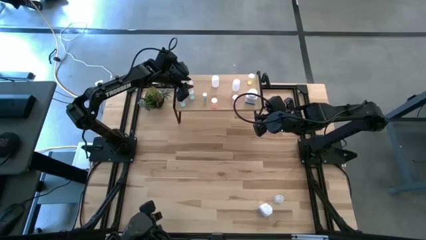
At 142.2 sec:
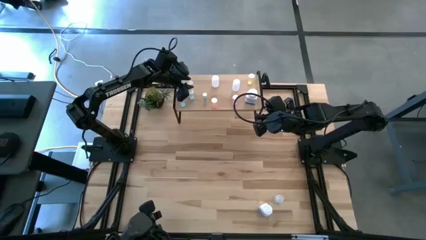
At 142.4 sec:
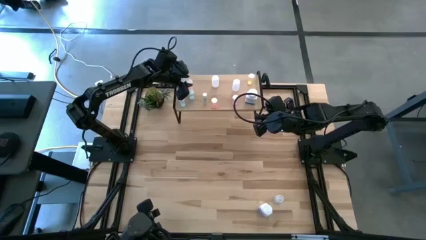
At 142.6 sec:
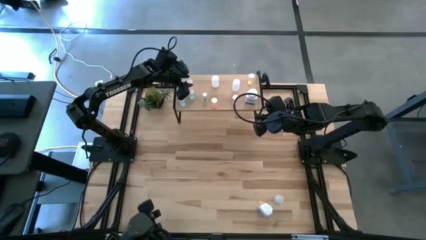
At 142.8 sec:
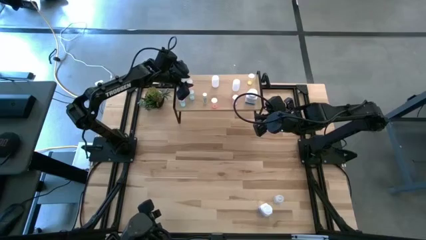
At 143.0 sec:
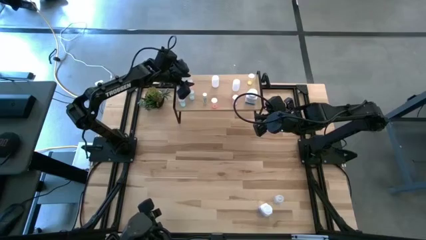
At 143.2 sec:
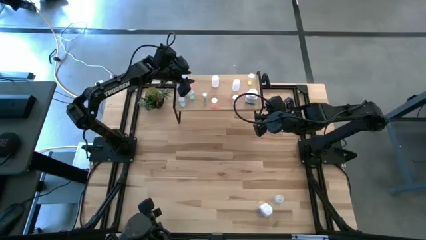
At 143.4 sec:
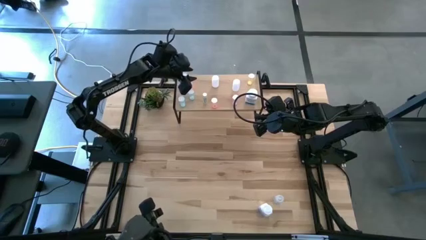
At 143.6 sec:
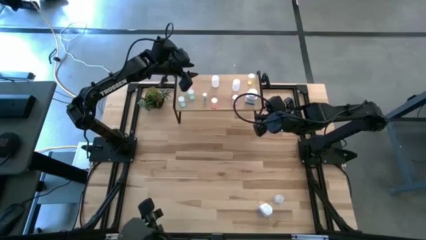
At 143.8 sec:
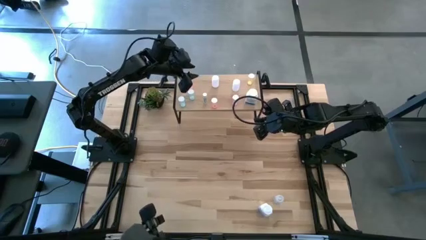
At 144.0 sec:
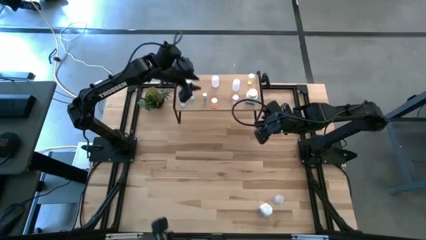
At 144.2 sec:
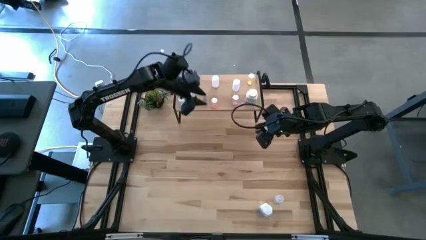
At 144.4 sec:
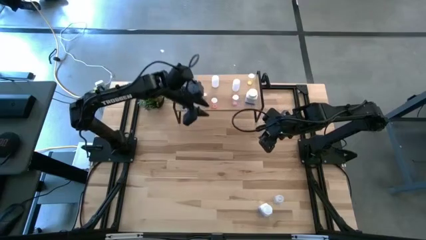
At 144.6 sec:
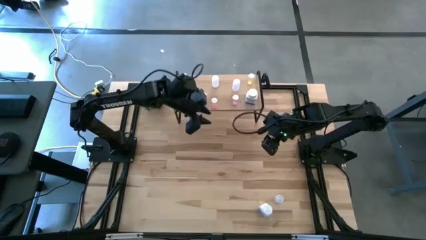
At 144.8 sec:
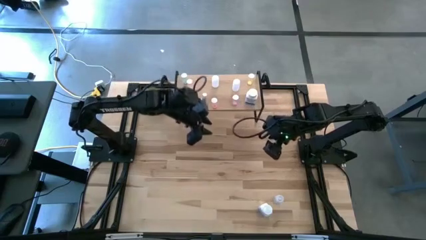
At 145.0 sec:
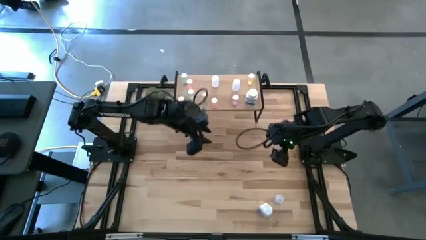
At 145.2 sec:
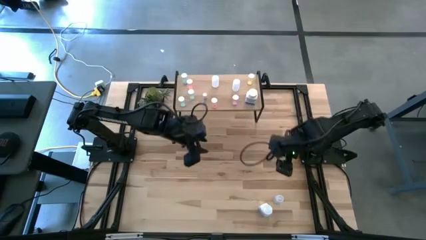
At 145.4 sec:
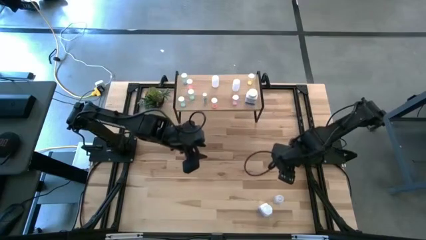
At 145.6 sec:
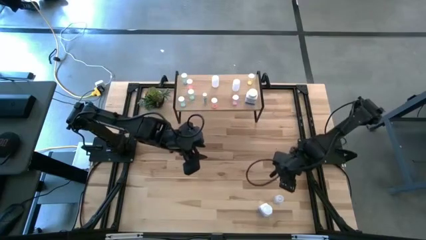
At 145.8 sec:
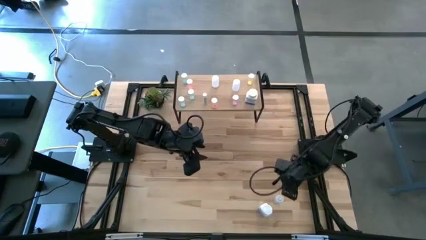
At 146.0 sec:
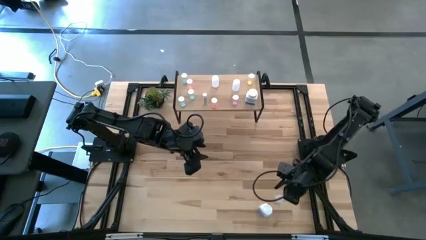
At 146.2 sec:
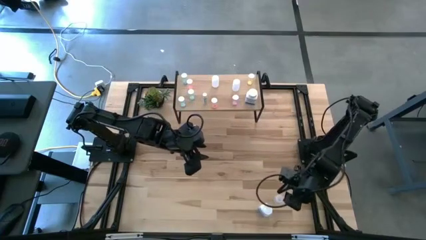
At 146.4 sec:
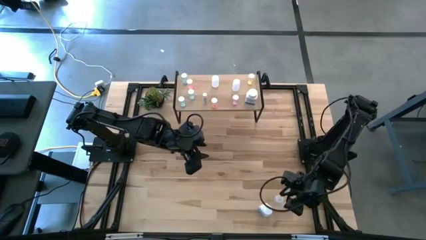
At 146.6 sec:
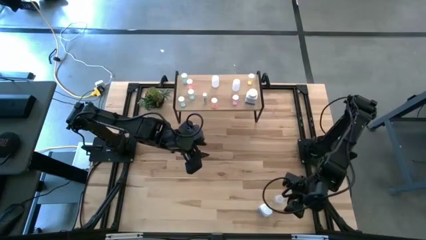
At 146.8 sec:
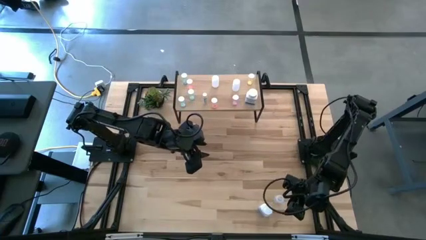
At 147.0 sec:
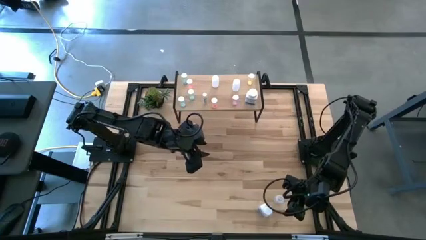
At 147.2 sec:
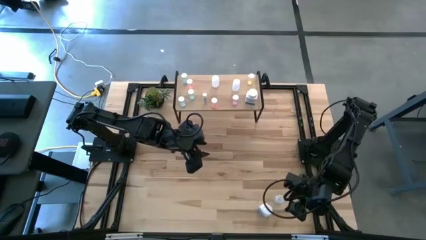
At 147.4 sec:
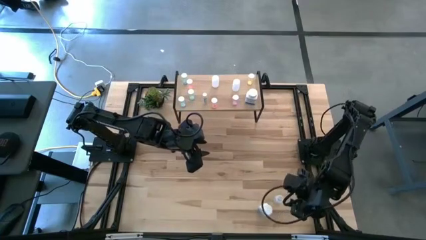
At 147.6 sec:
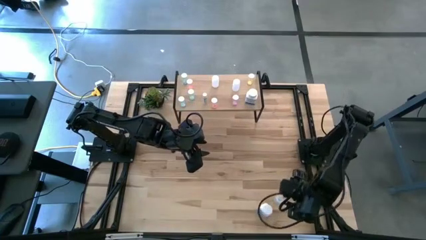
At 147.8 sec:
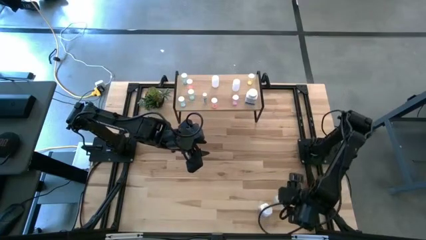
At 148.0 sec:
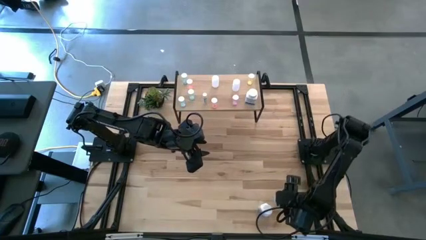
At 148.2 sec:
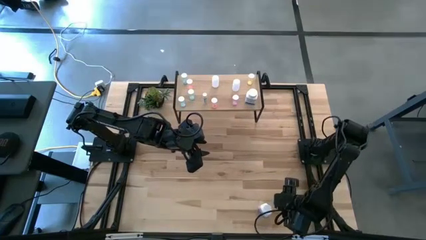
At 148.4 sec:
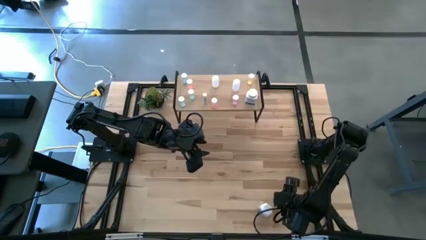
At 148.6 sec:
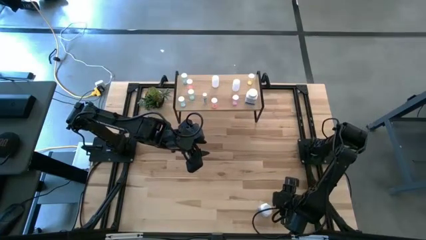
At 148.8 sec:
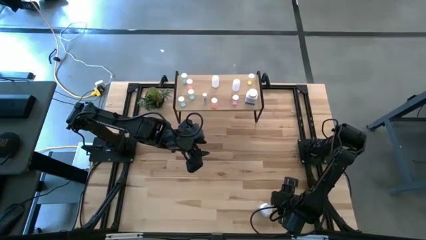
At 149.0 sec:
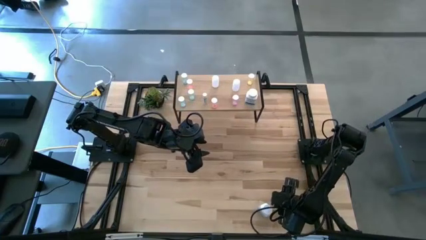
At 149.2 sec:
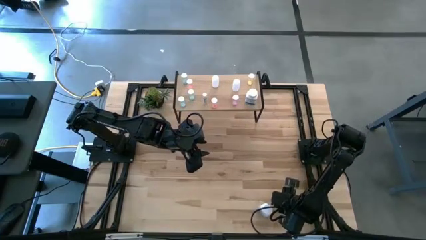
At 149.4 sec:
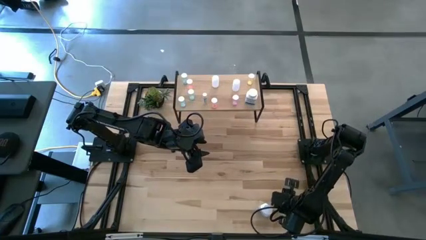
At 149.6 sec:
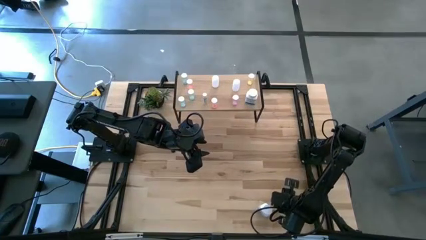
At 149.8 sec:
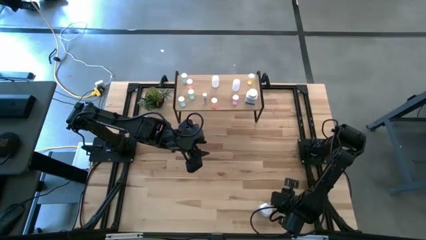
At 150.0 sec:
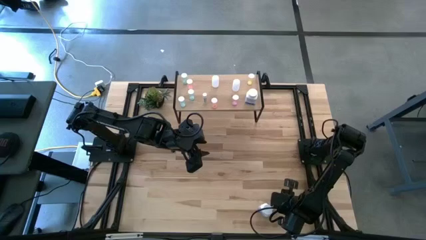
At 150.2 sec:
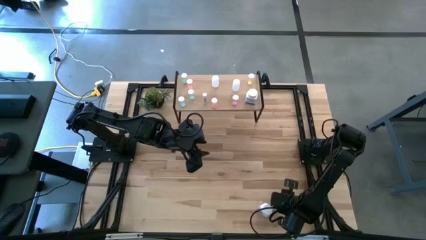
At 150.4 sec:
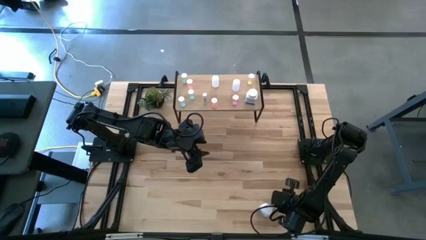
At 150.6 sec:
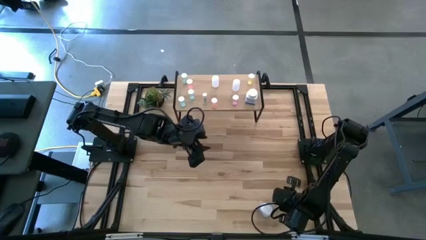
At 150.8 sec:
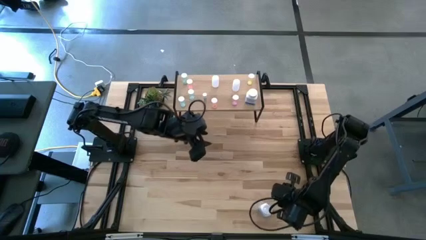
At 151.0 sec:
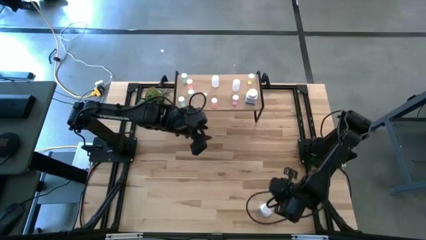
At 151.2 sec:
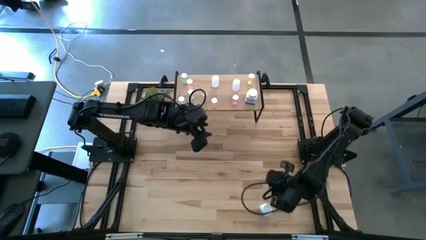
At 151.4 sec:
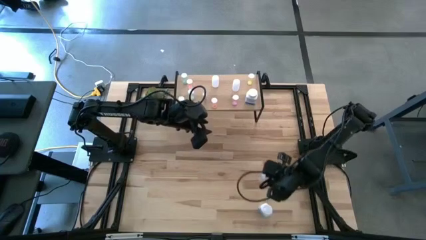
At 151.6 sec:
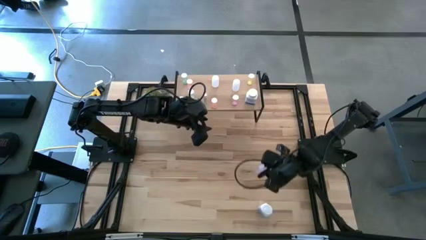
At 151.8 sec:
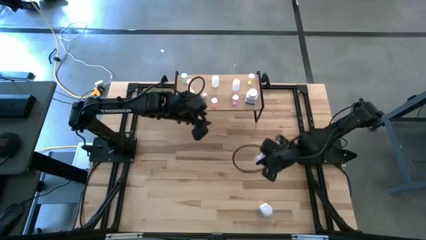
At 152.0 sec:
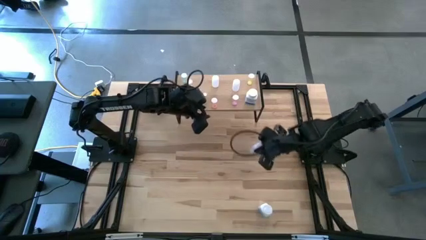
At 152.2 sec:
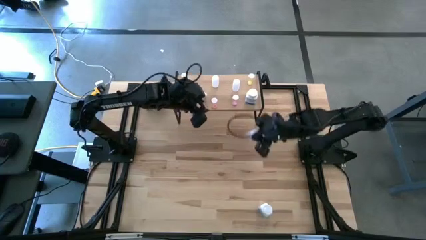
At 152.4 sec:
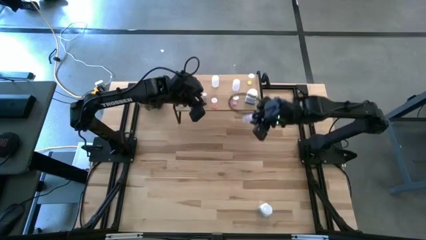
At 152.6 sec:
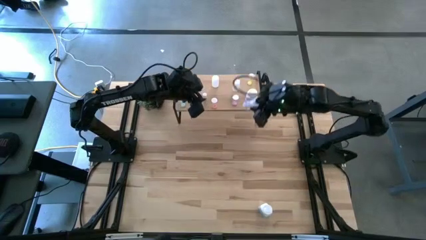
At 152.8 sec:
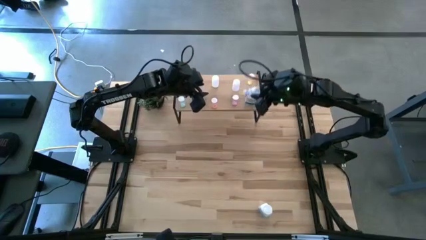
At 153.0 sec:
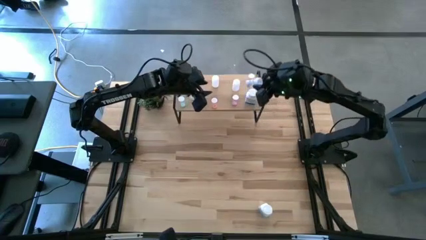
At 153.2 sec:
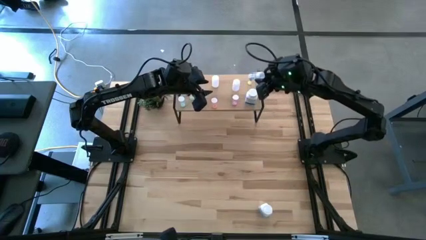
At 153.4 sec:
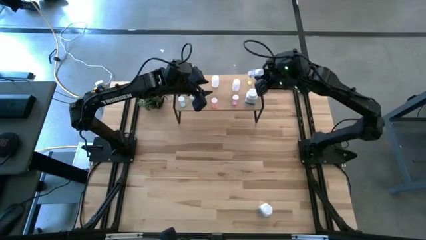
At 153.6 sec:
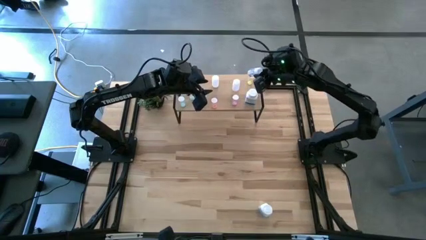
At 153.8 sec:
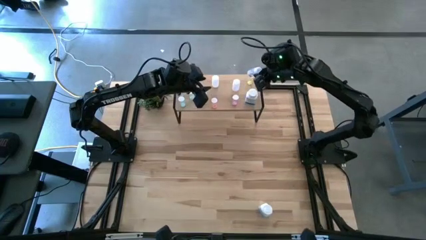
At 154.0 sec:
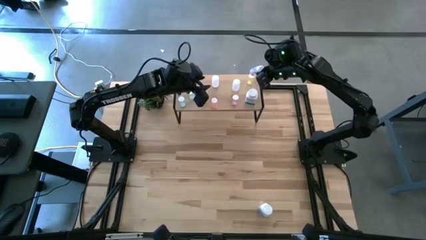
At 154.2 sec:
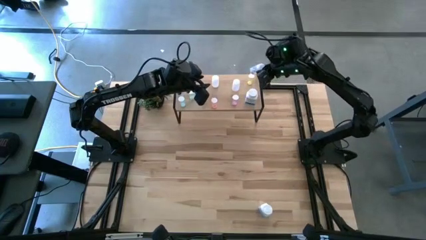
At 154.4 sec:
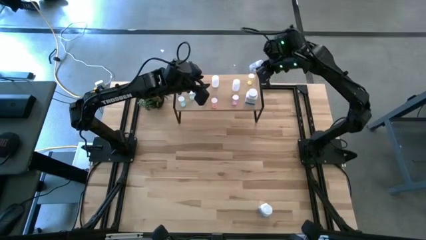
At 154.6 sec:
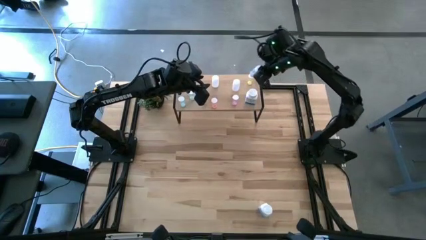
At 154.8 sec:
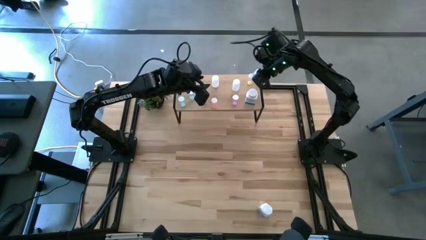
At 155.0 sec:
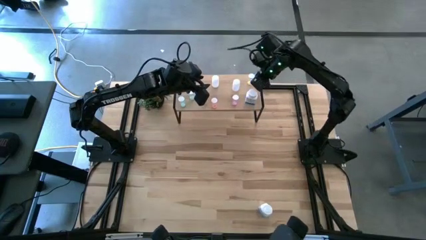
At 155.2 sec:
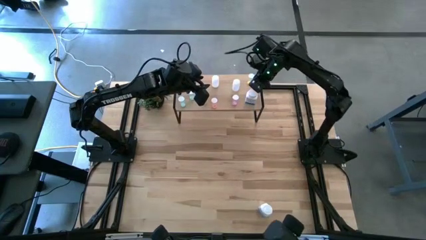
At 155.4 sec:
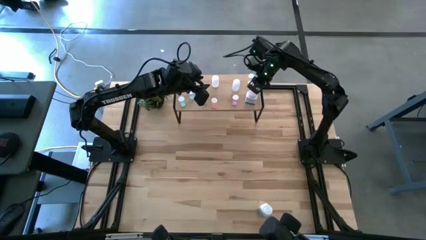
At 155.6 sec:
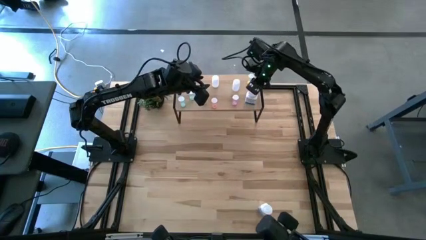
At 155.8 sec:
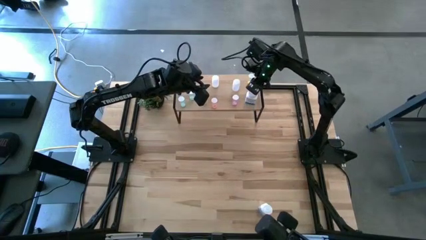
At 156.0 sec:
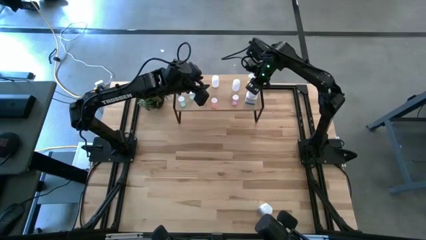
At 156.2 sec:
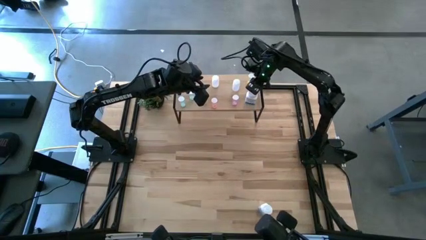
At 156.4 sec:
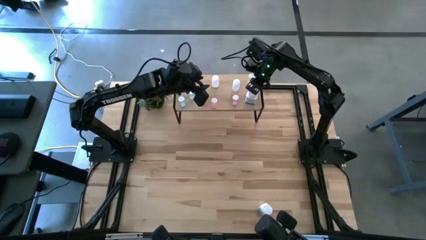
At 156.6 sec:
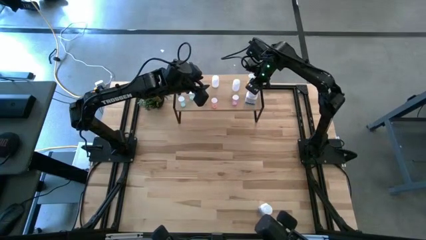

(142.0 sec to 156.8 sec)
Task: Pick and place medicine bottles onto shelf by color
Put the transparent pill bottle on the shelf

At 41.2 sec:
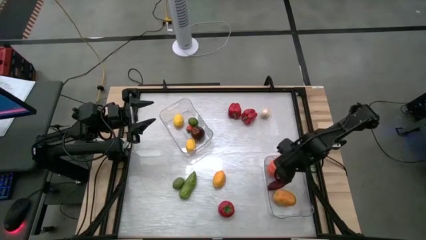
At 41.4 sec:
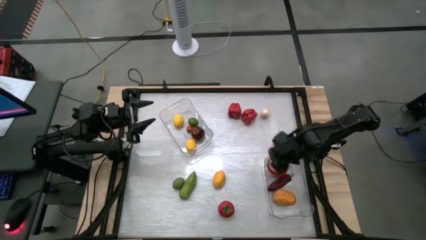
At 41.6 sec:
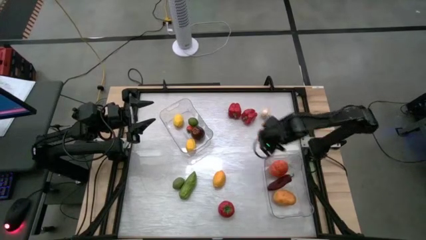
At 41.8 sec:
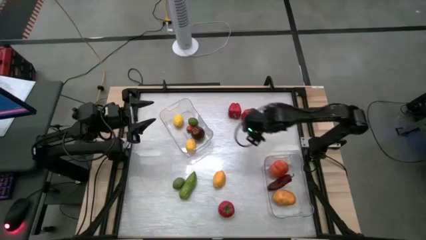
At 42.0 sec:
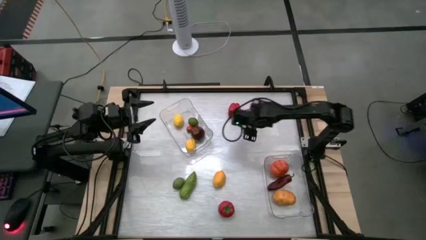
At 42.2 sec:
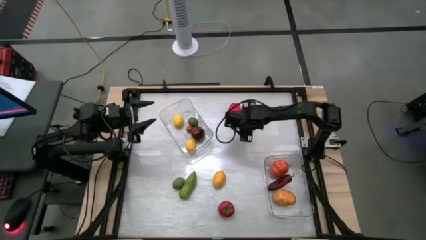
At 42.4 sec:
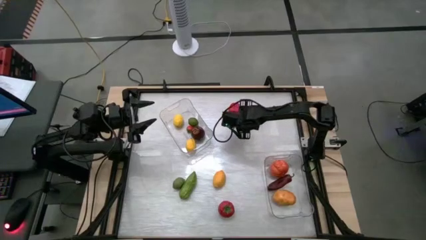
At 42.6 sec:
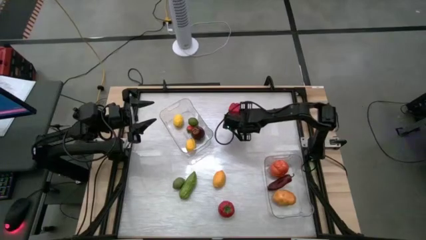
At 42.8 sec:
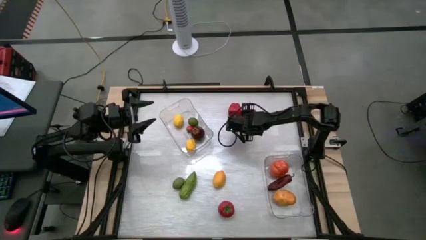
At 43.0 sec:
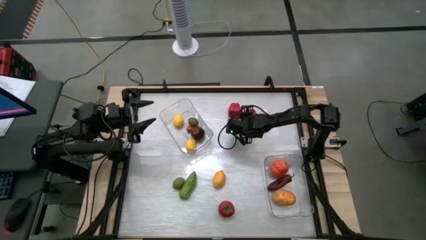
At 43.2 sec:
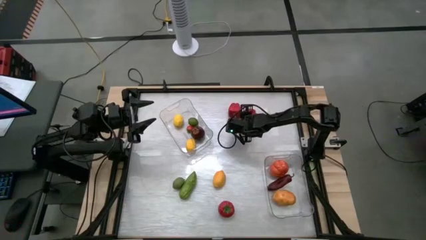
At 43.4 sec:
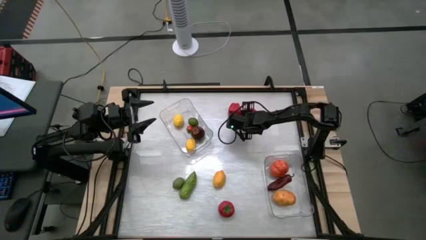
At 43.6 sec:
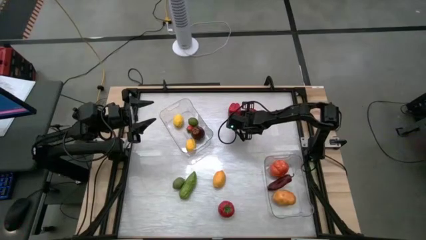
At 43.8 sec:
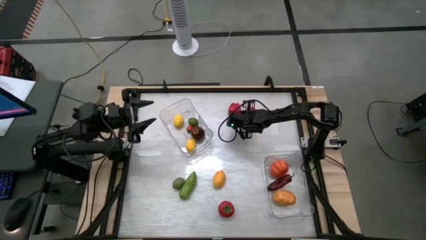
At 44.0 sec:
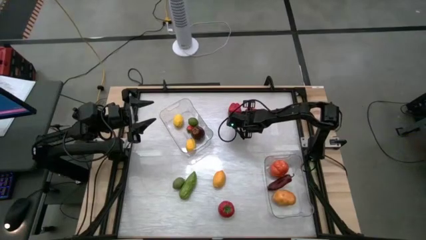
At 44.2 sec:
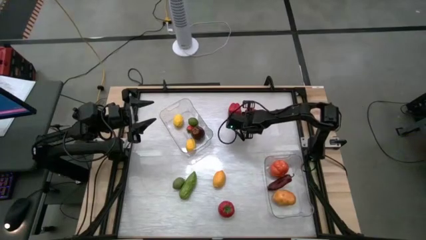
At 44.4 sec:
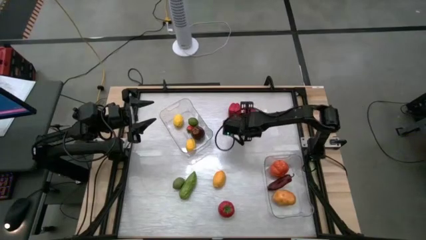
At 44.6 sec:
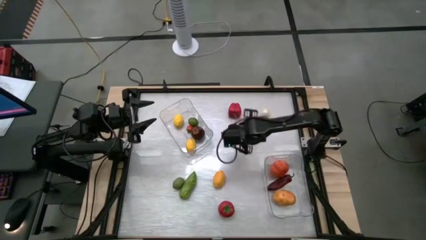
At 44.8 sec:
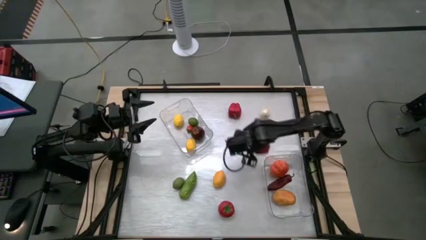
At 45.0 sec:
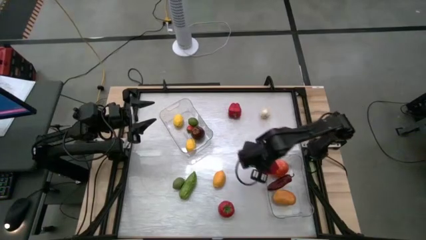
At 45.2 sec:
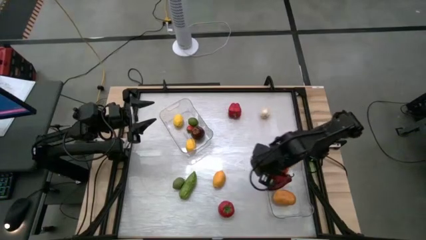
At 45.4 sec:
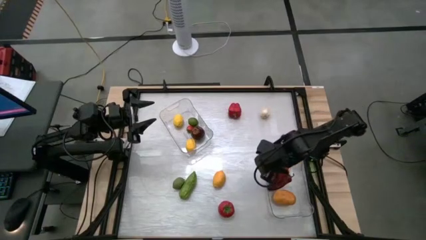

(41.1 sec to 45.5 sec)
Task: Sort produce into baskets
Put the right red bell pepper into the bottom transparent bin
